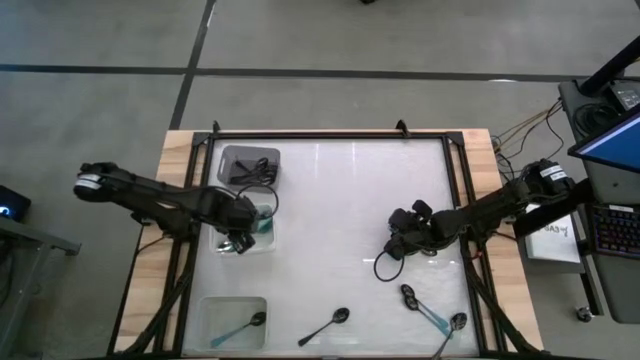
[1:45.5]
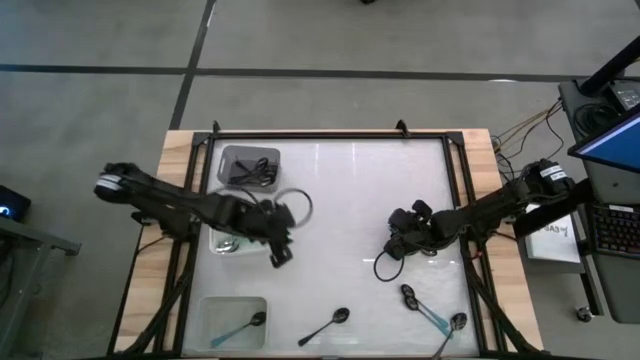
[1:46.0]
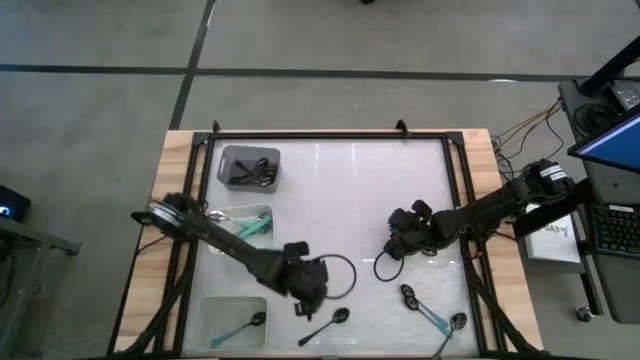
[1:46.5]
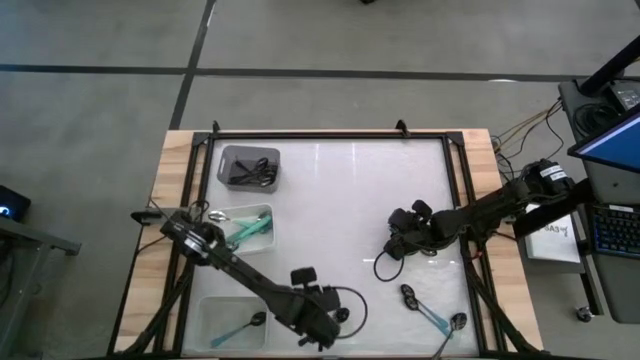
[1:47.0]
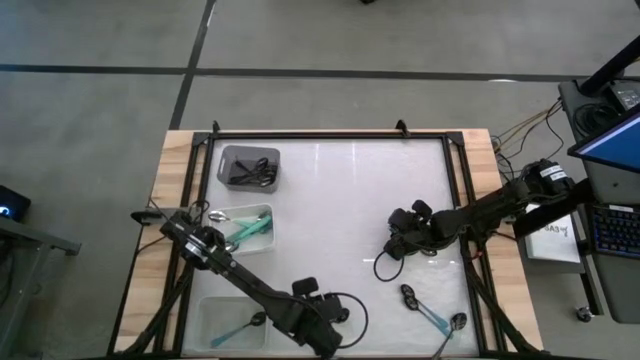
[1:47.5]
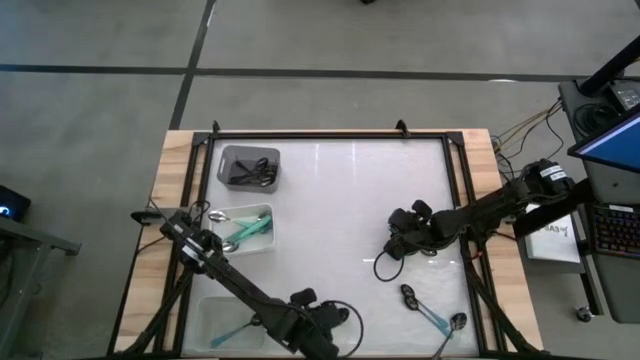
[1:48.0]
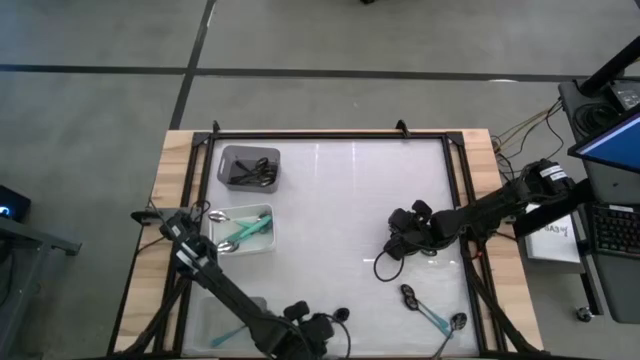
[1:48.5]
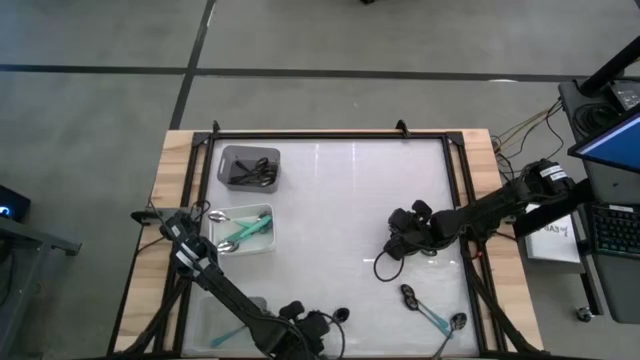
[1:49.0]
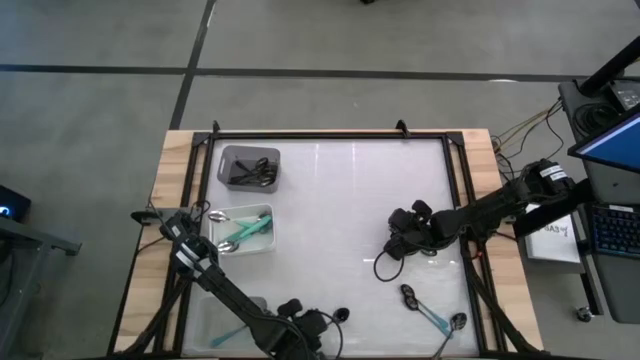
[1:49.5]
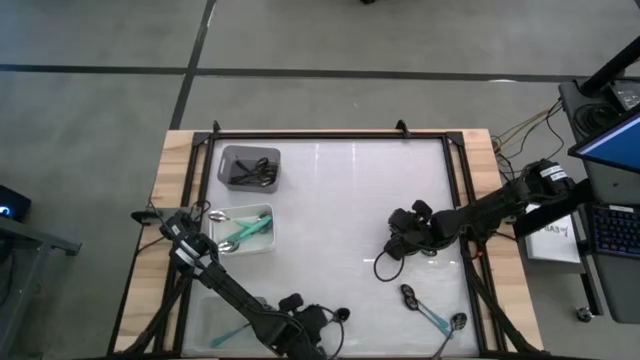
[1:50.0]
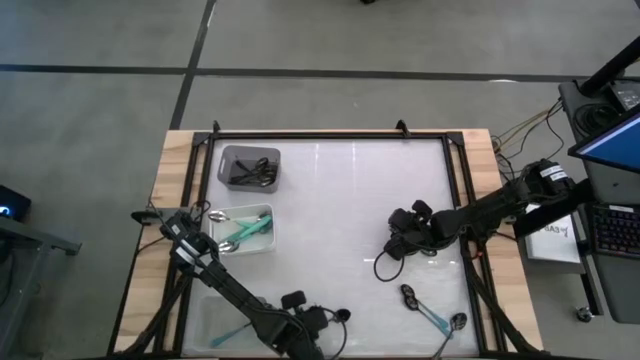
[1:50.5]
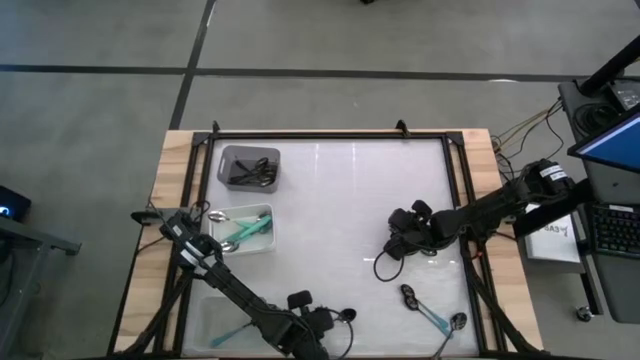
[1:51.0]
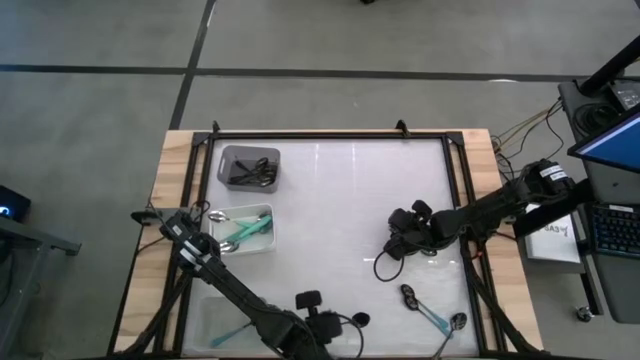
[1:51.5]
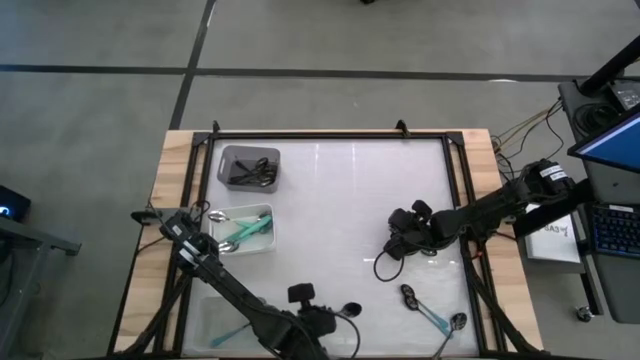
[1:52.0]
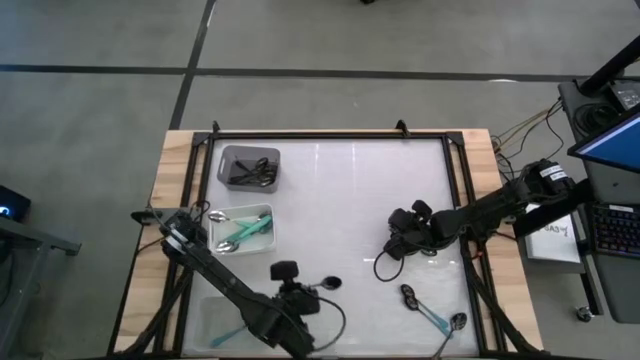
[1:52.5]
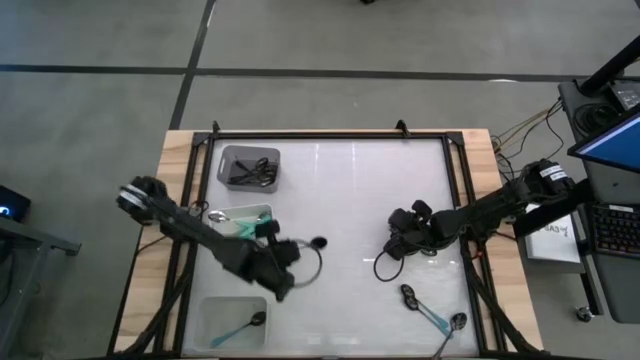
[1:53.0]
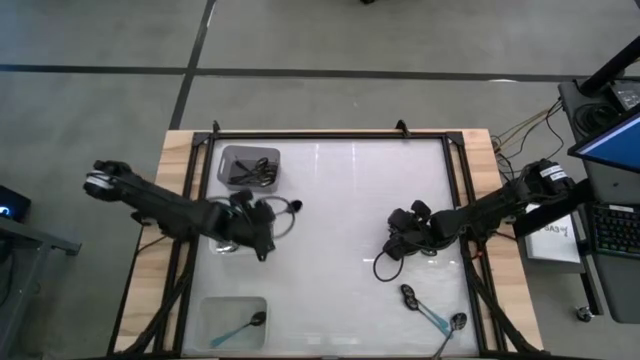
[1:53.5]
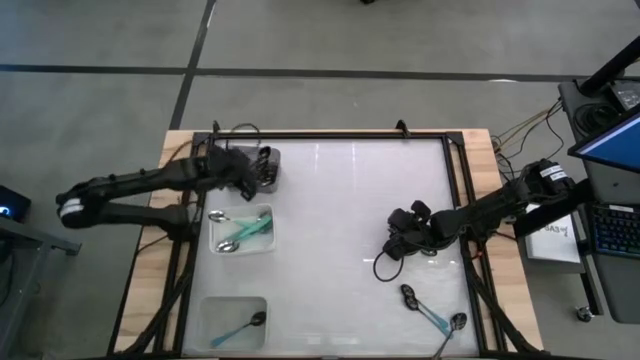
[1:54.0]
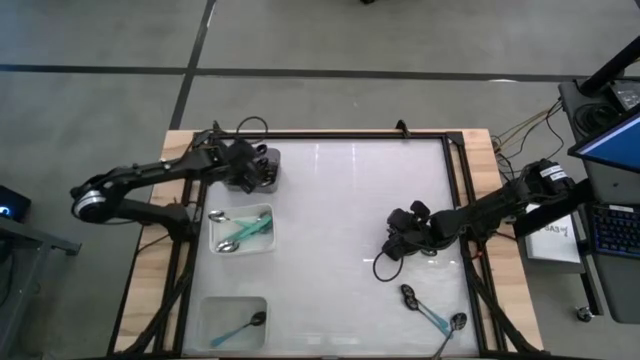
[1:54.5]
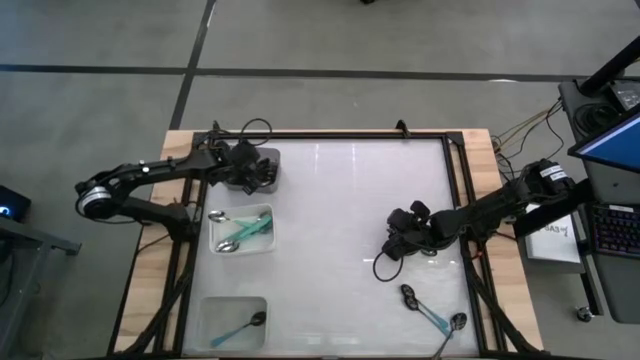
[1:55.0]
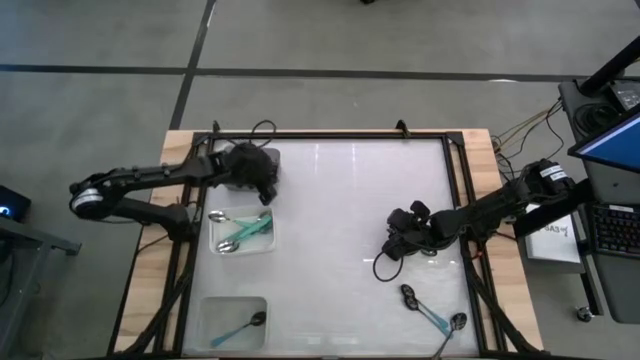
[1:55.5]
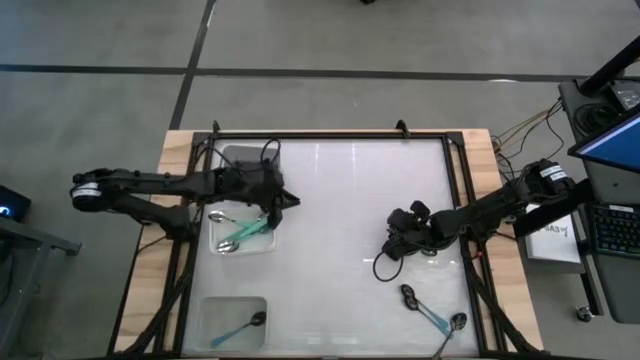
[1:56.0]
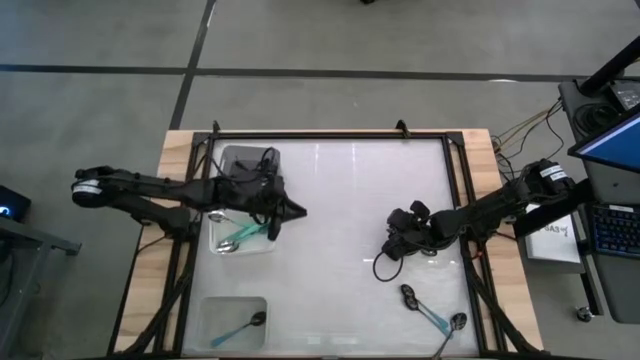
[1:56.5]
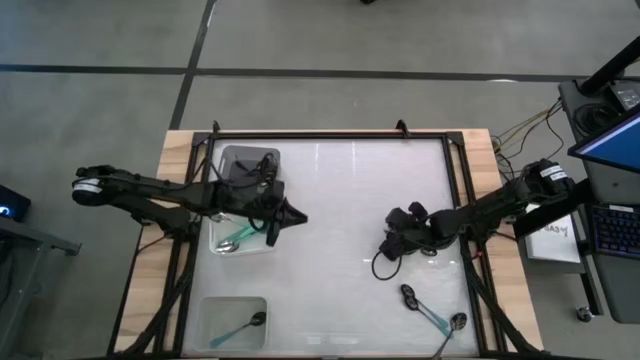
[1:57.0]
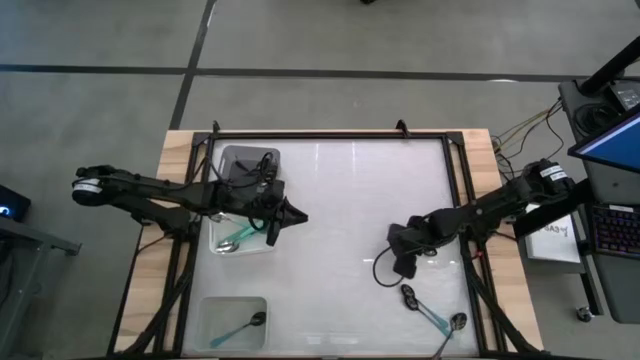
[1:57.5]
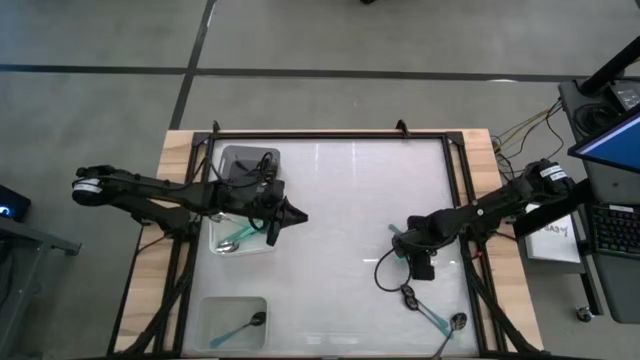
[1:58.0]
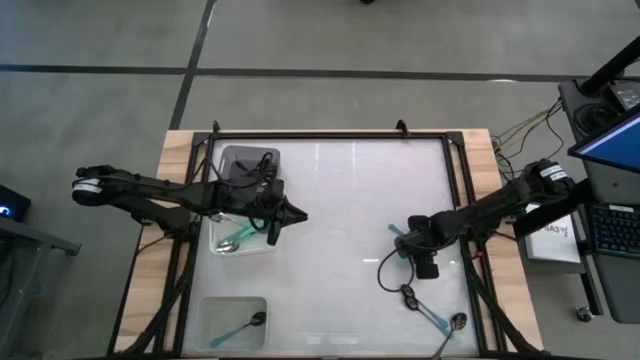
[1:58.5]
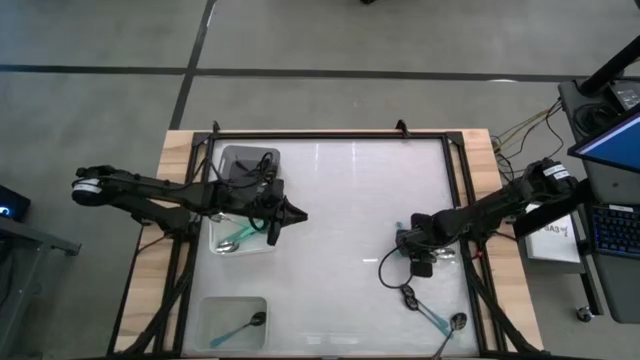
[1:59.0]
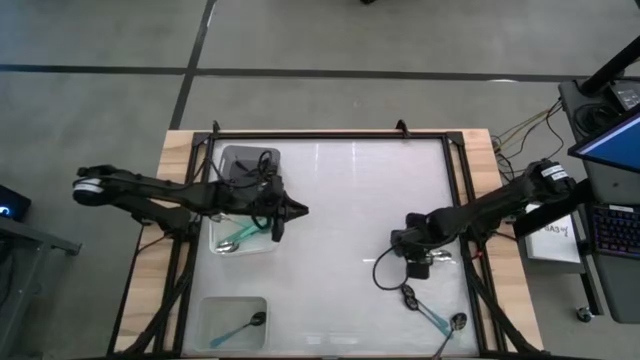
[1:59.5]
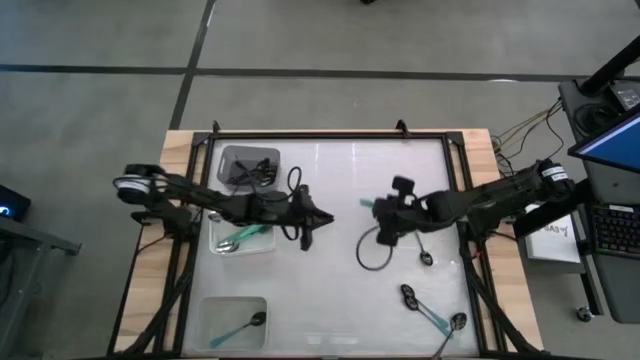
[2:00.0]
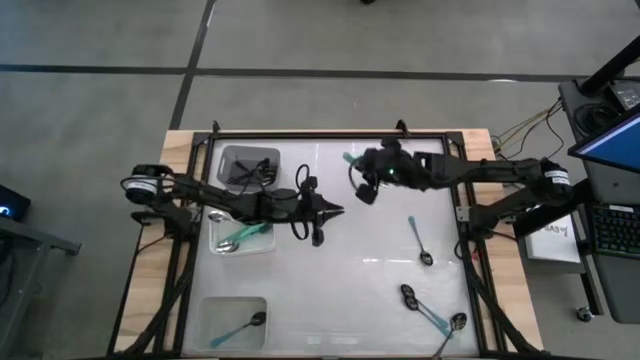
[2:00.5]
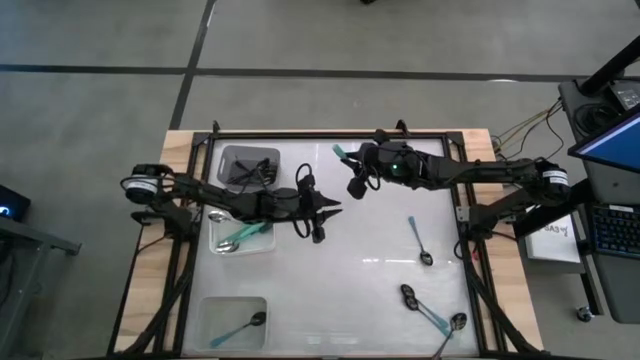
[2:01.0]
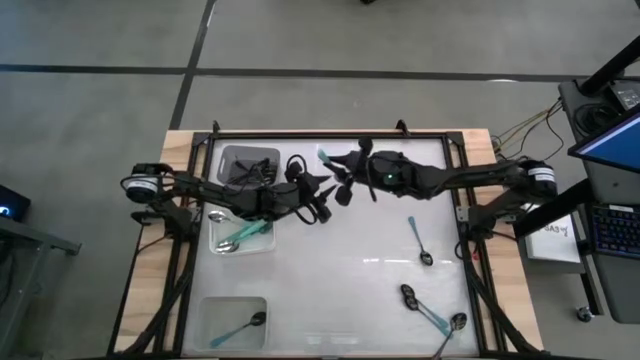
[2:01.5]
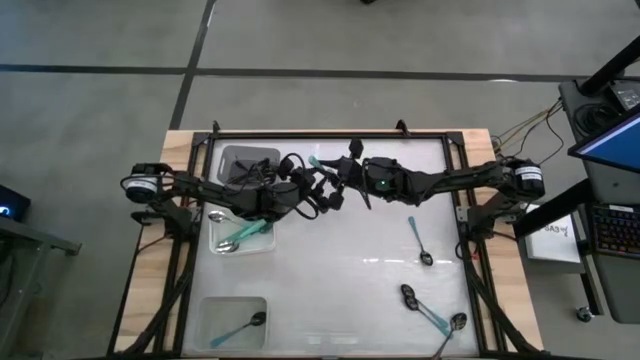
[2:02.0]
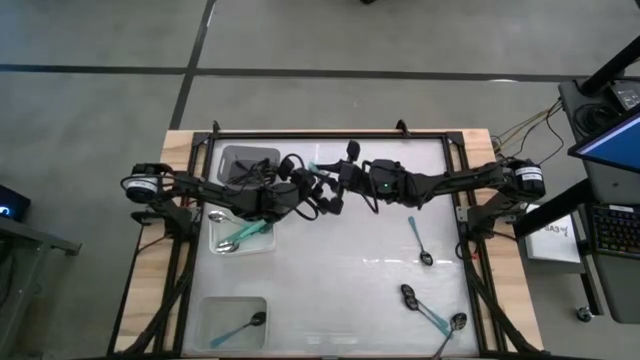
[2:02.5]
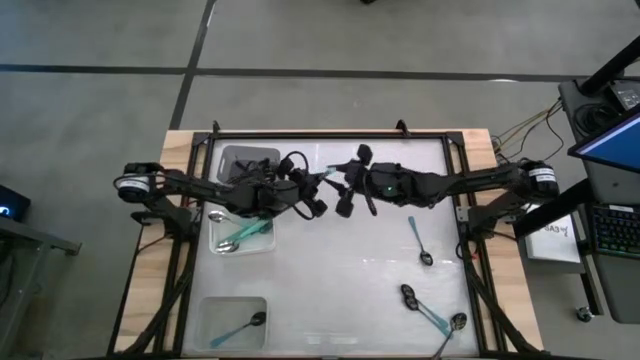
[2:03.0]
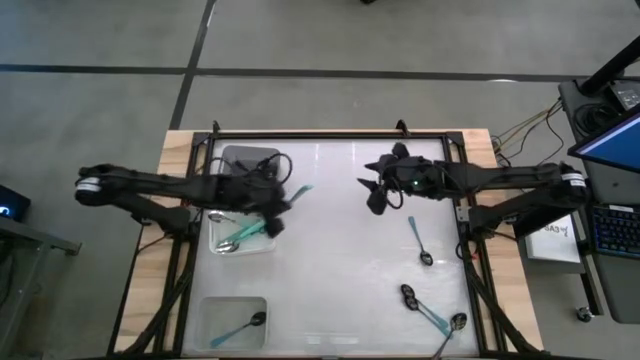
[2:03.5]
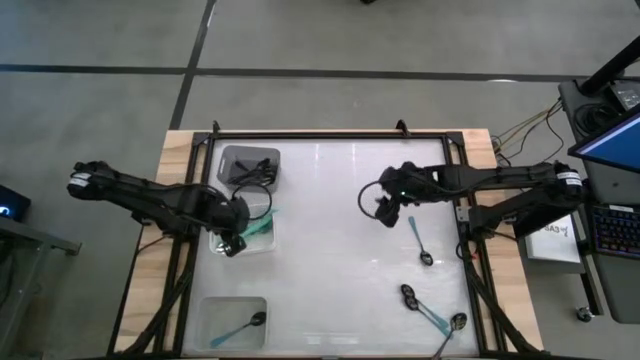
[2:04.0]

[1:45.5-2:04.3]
Task: Sort silverware by color (type)
Put the black spoon into the black bin

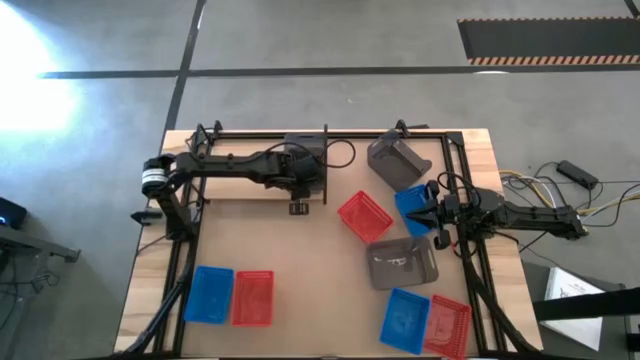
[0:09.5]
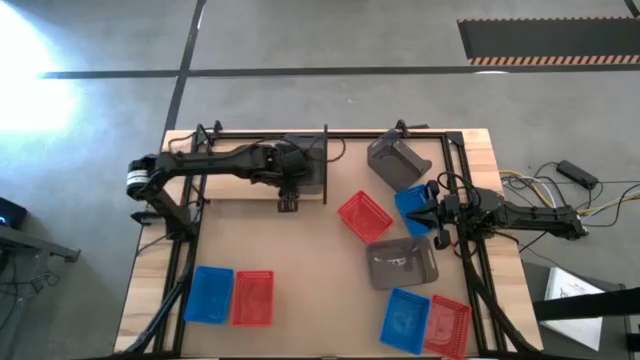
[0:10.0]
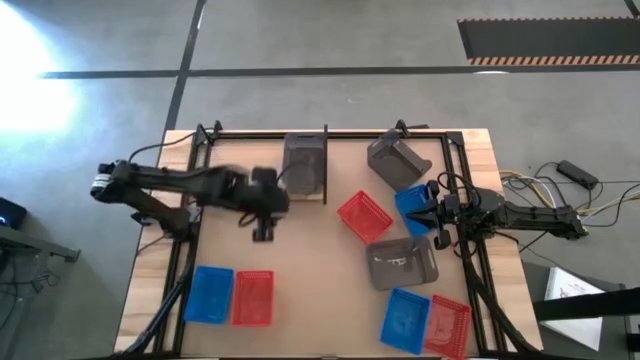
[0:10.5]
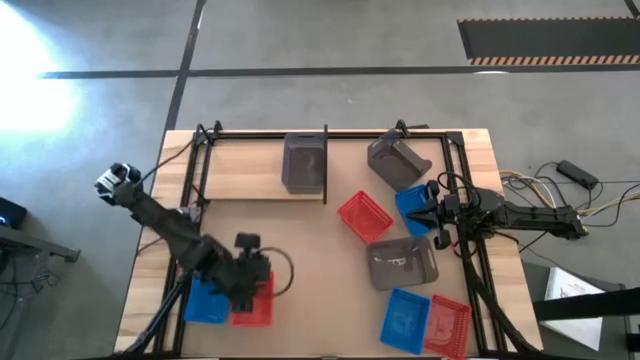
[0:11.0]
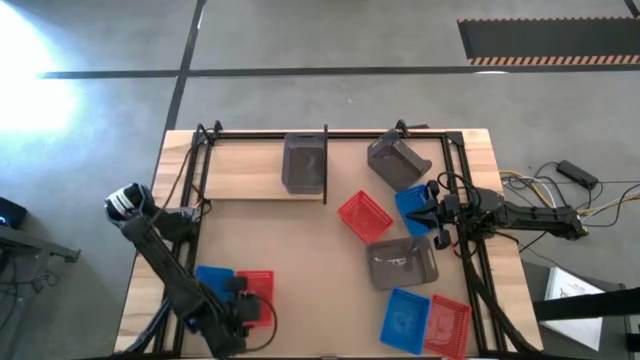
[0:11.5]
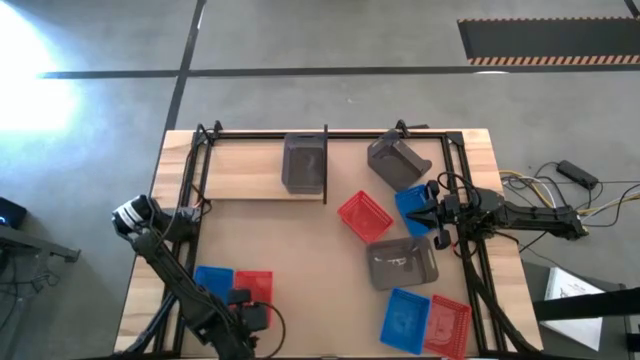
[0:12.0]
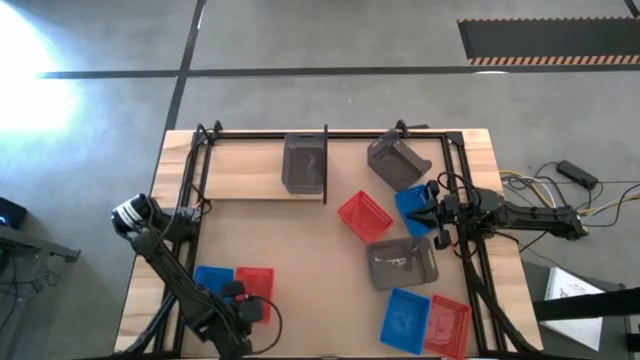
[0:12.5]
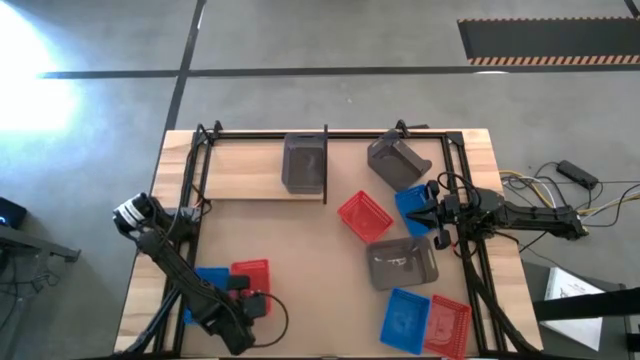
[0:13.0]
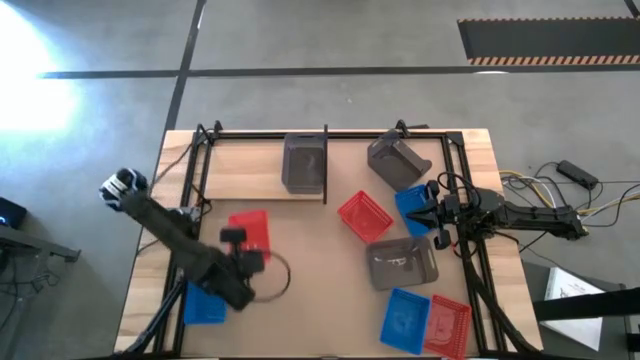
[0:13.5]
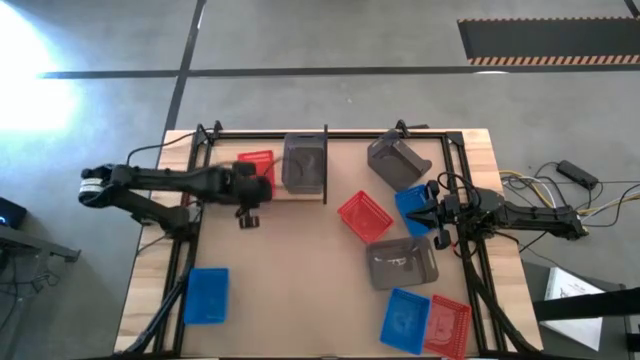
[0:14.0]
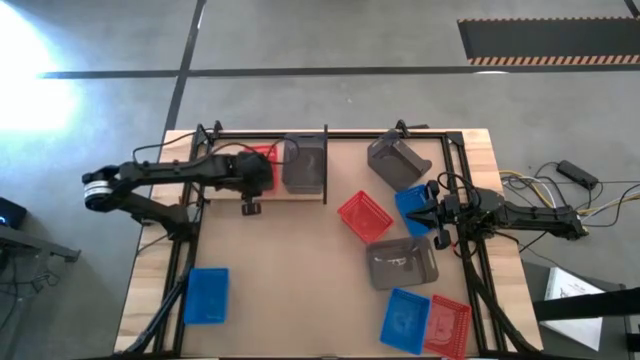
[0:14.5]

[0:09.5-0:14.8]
Task: Stack baskets on shelf by color
Put the middle red bin on the shelf
